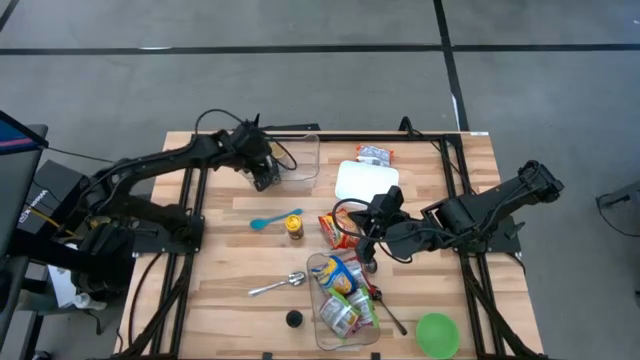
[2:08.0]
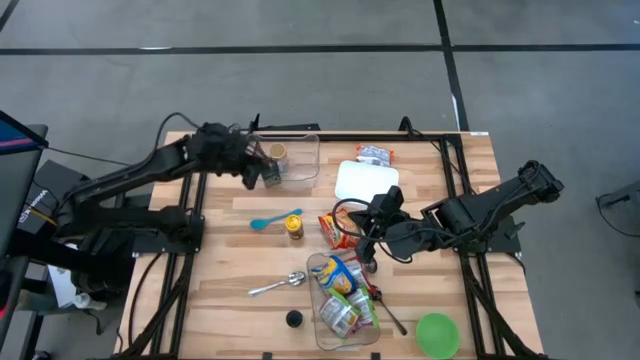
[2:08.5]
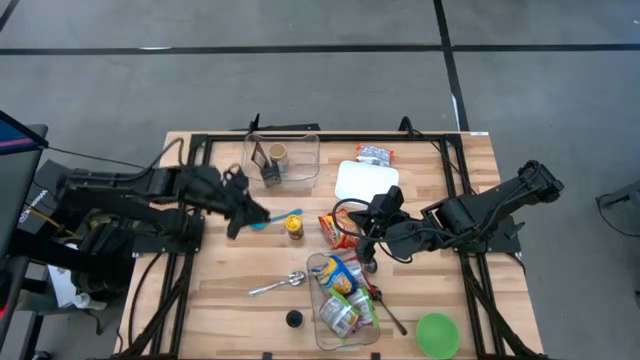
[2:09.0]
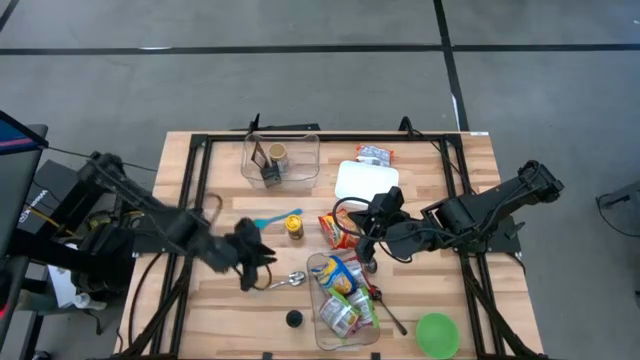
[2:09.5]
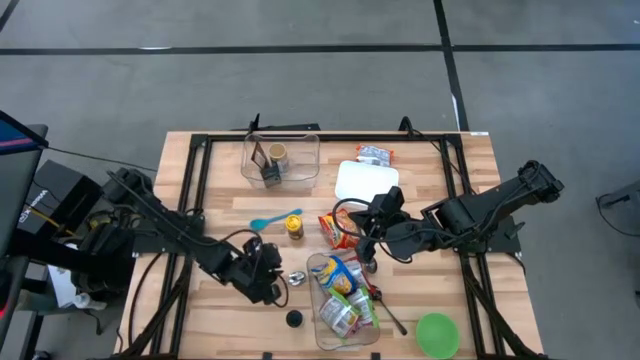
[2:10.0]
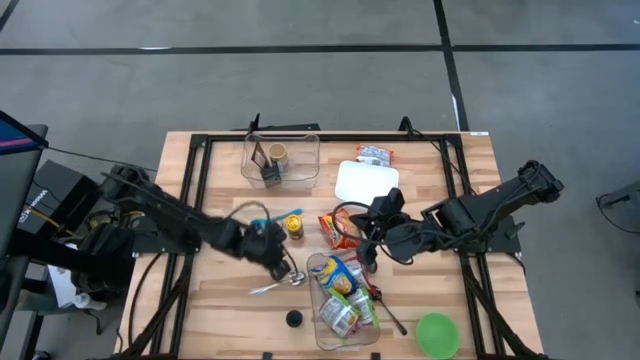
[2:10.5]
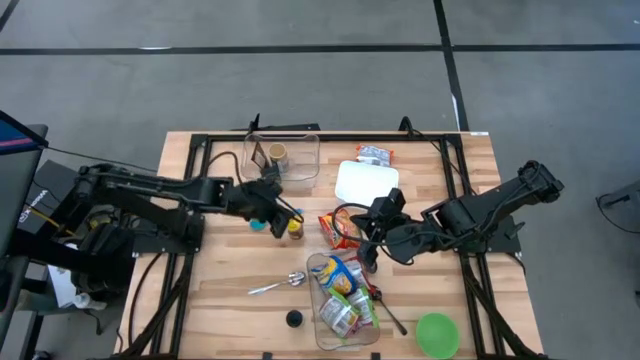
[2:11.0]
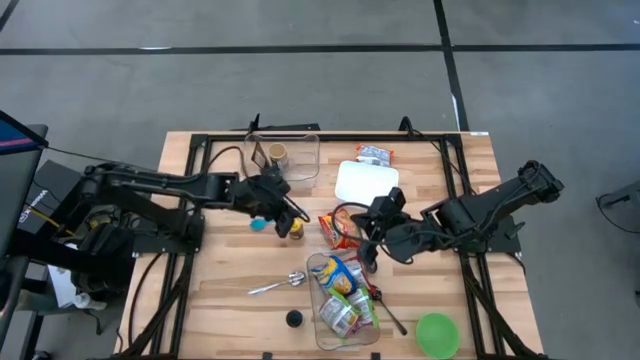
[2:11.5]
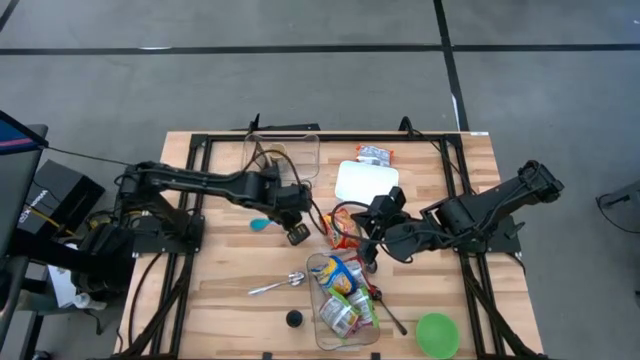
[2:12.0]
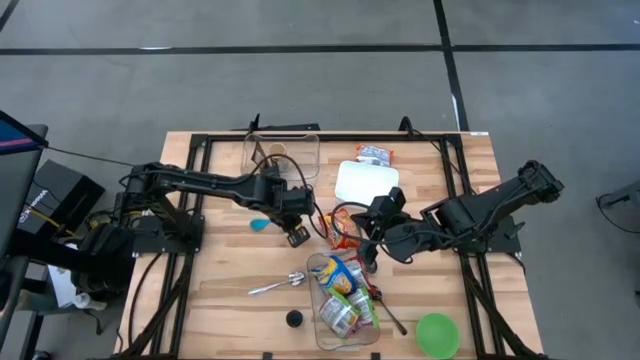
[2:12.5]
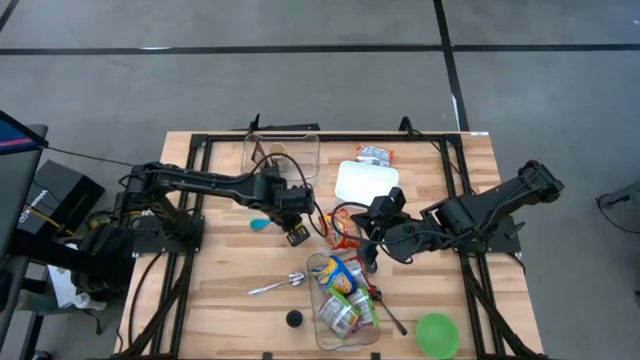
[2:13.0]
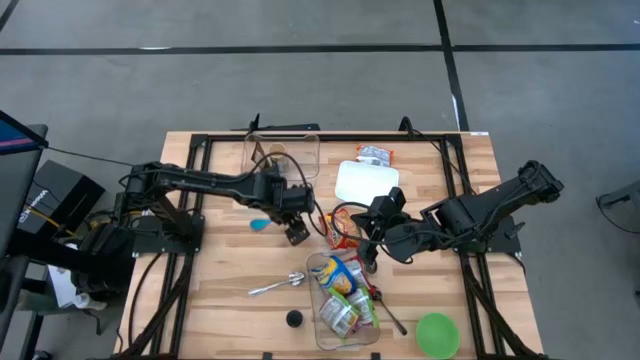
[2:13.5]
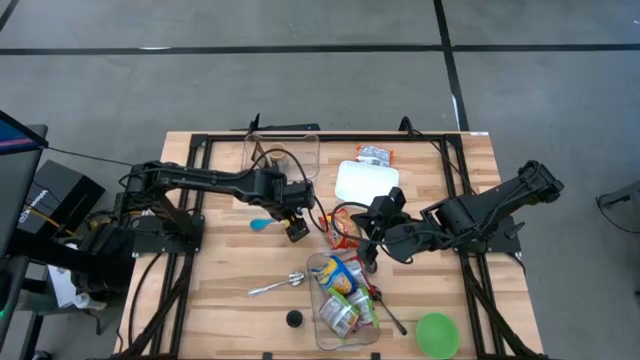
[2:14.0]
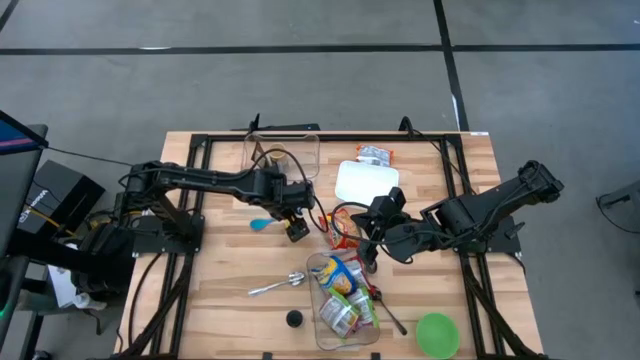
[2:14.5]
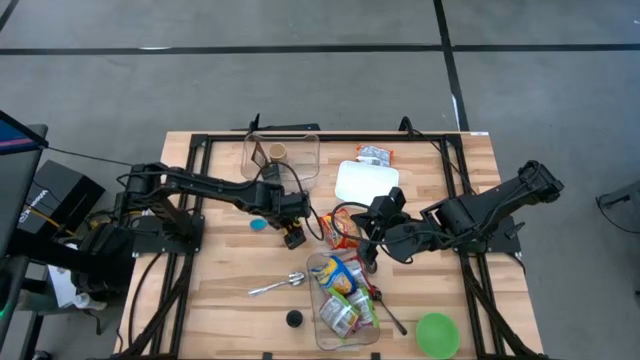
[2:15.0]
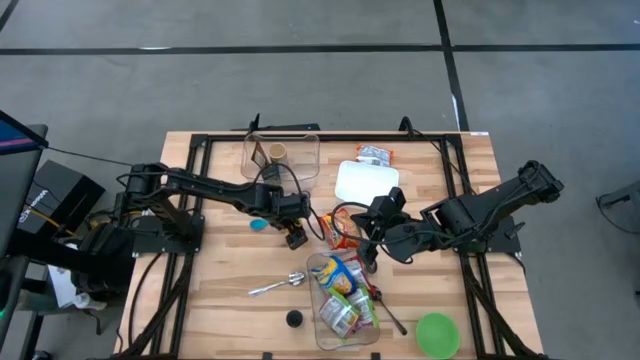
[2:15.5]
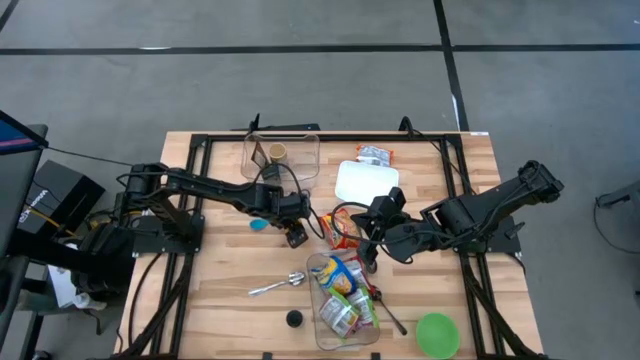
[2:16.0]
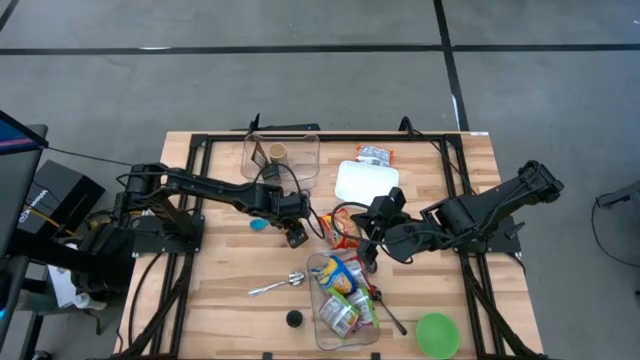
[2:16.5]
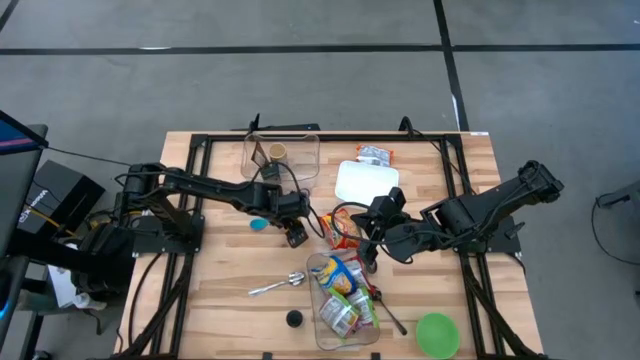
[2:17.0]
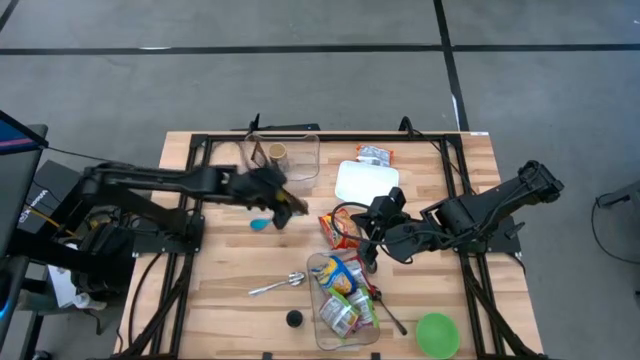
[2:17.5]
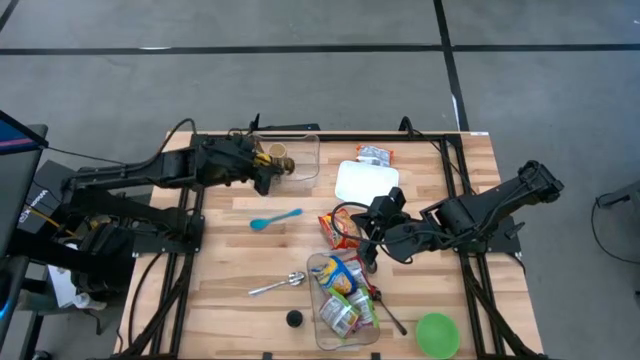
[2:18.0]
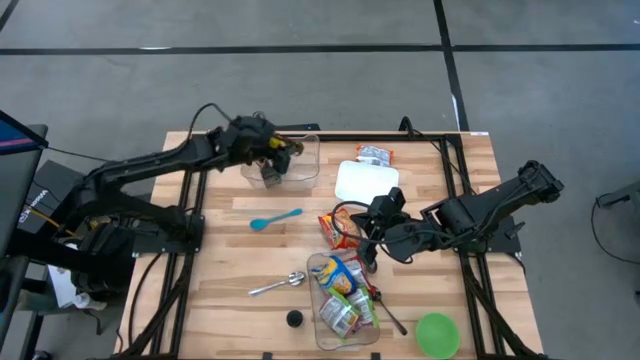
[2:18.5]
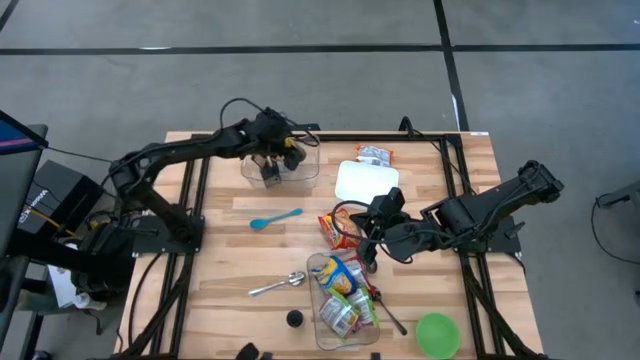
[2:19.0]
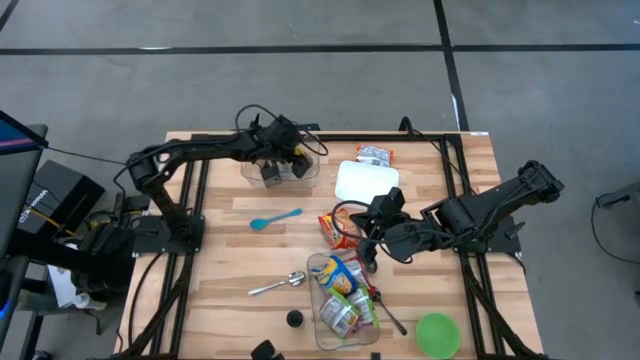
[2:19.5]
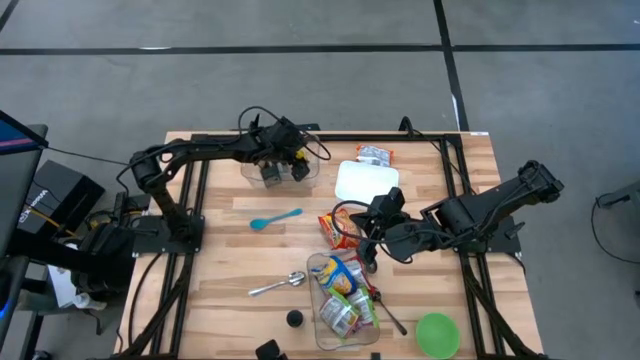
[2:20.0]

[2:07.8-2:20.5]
Task: Pick & Place Food Item
Put the yellow seasoning bottle into the top transparent bin

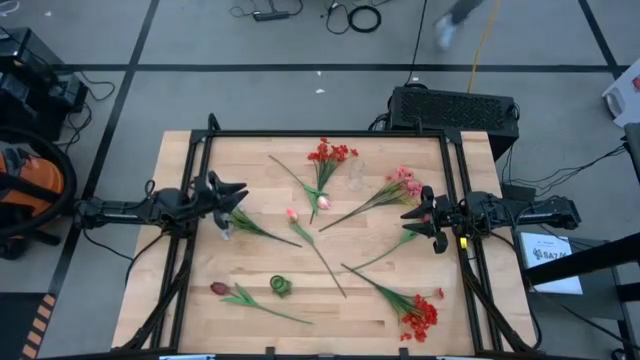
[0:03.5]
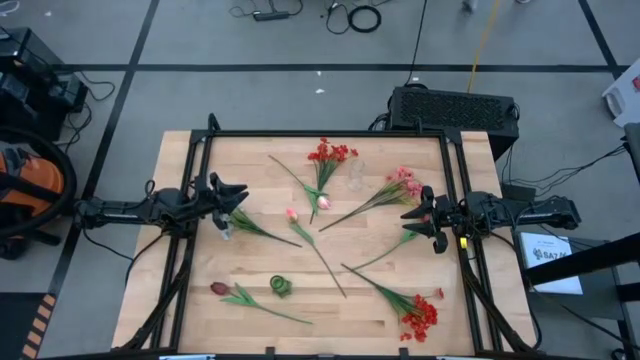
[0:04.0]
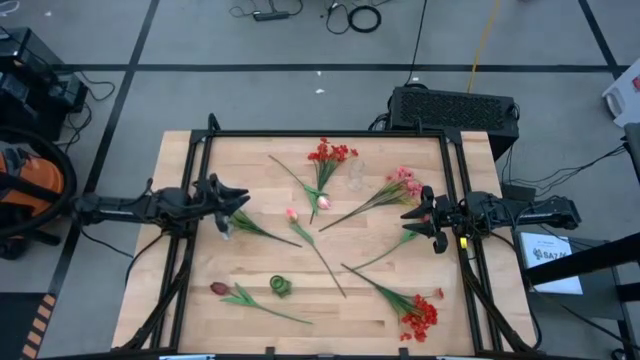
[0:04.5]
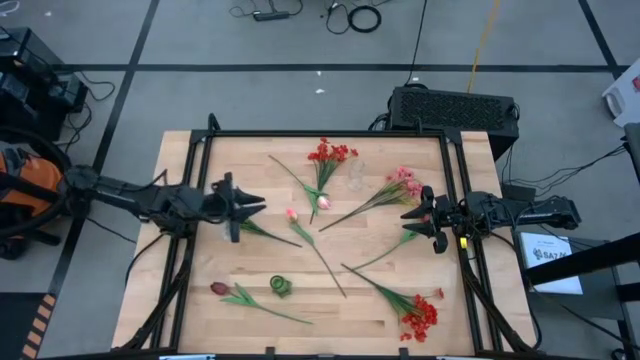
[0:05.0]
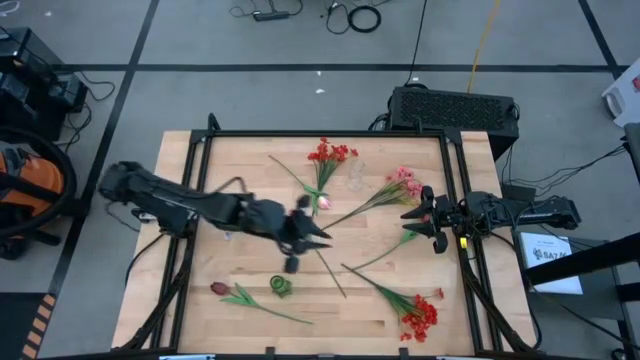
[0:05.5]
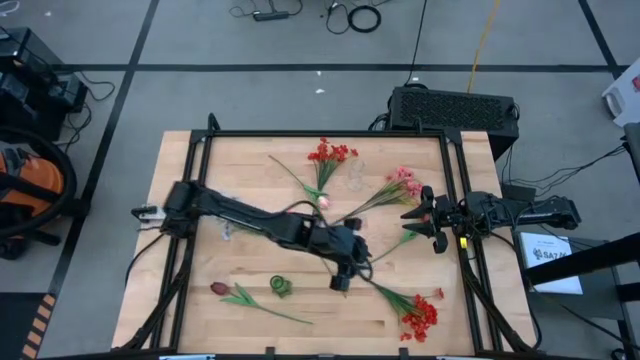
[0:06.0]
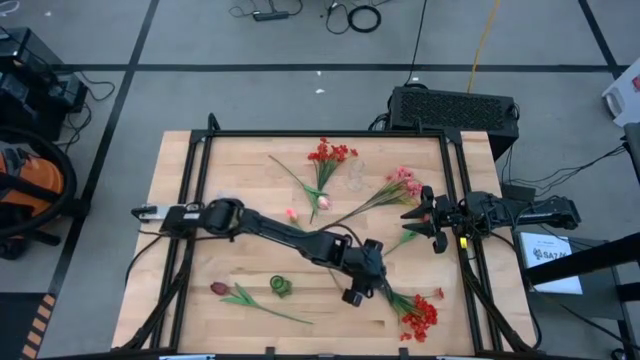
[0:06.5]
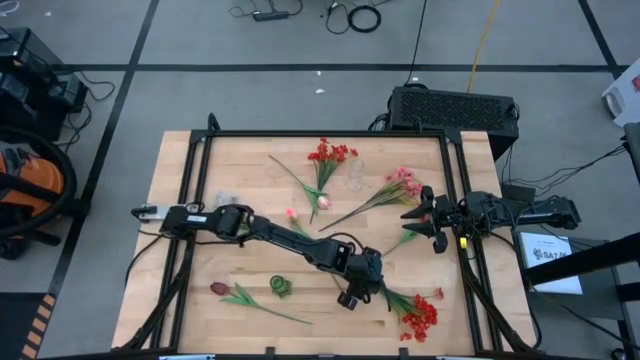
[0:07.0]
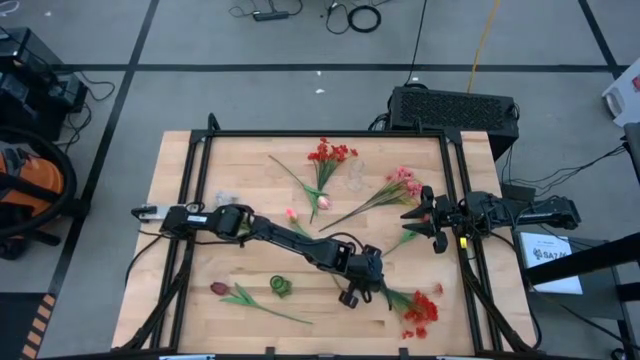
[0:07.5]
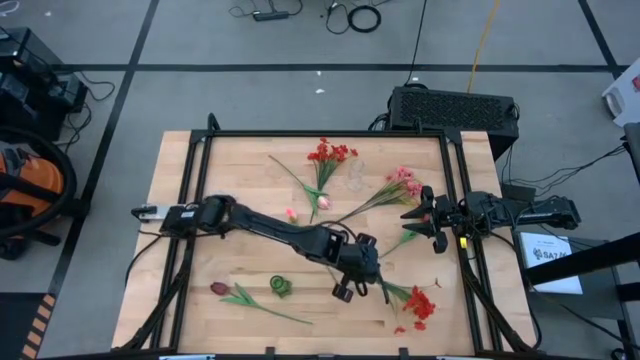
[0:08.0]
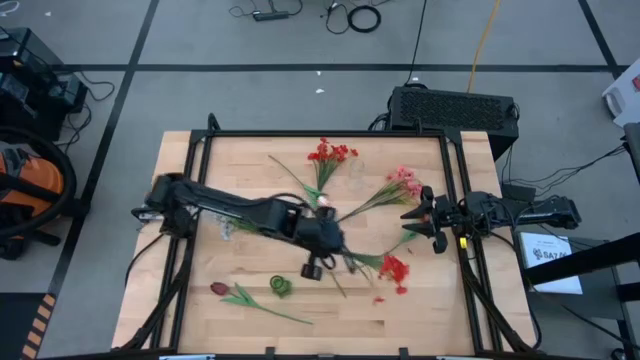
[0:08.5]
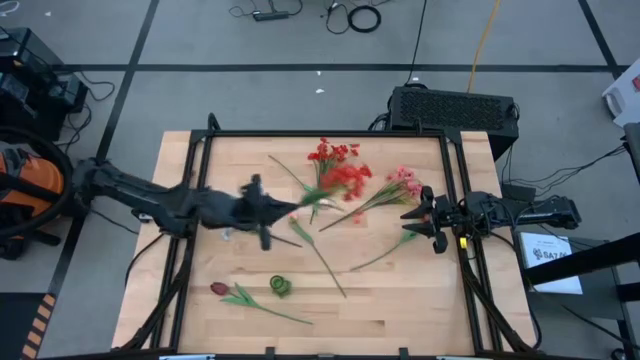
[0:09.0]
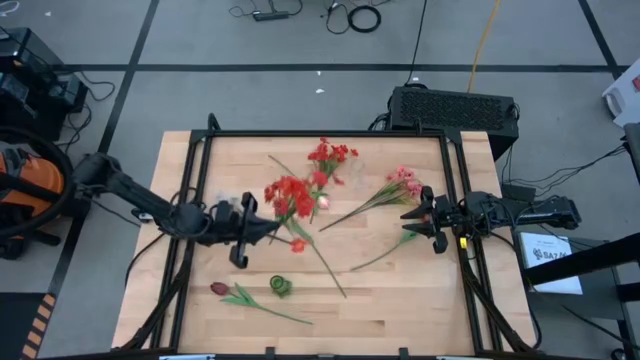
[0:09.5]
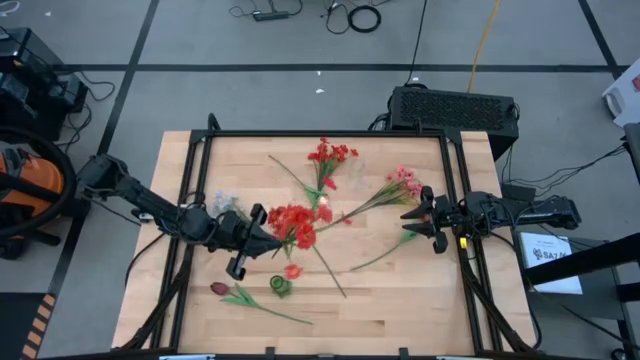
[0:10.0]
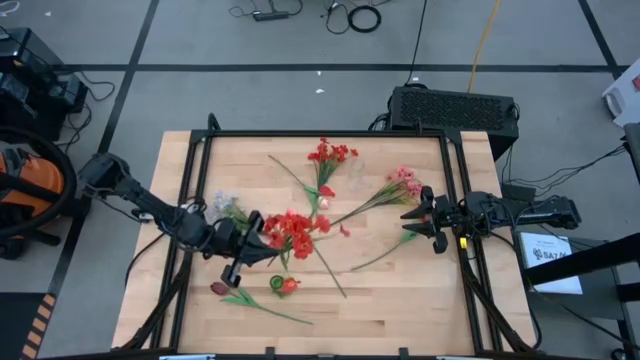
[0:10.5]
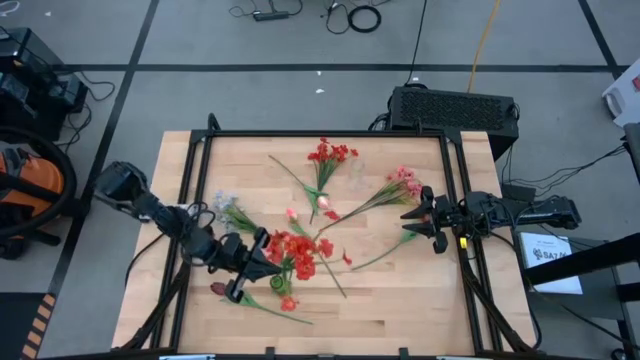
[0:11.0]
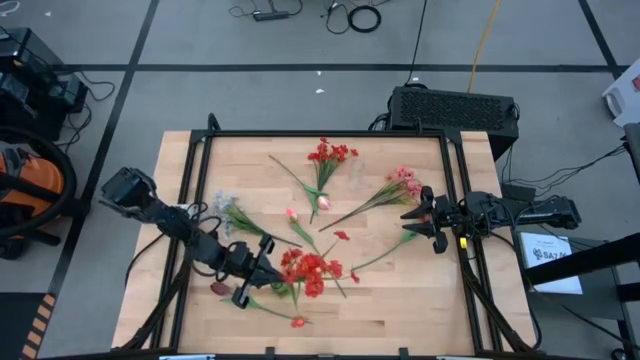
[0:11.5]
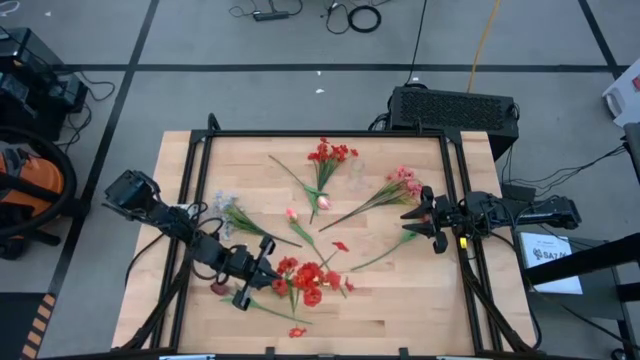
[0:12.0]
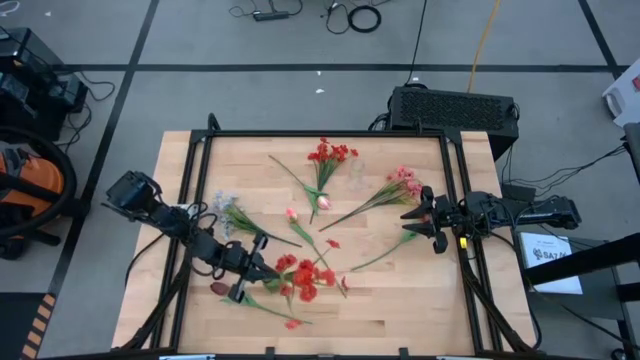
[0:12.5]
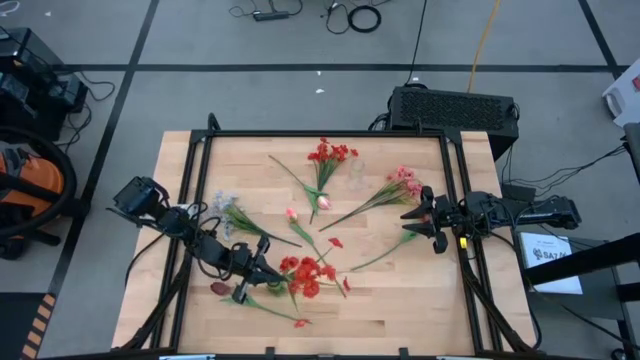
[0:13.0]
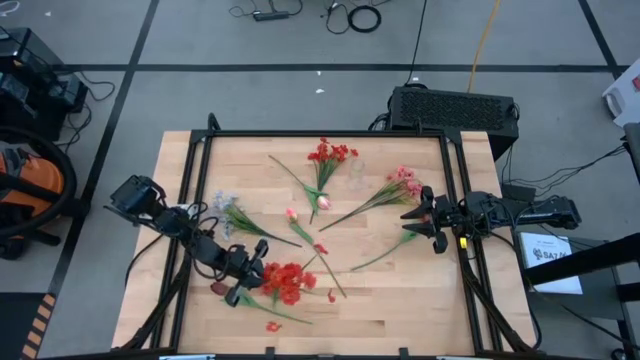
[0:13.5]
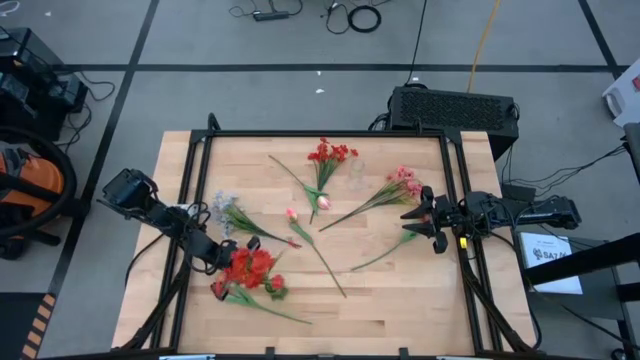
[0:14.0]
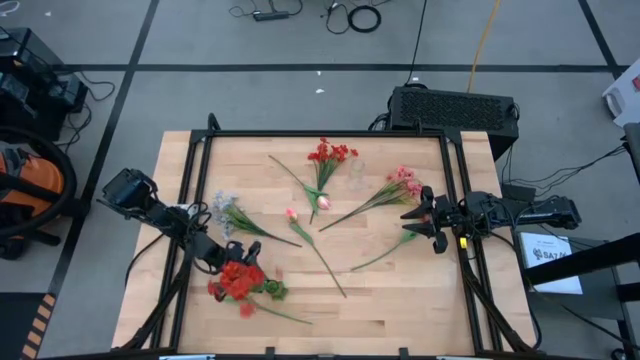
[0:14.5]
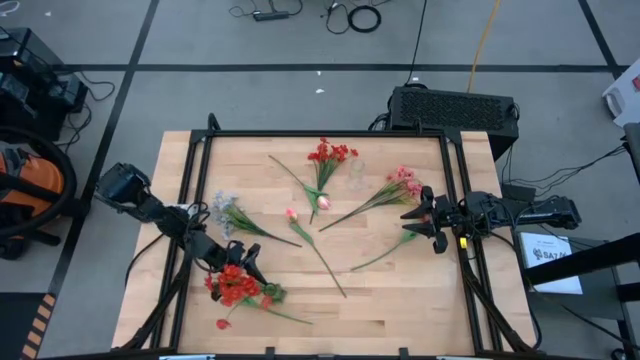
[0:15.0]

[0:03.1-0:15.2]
Task: Sort flowers into vase by color
Put the bottom red flowers into the green vase
